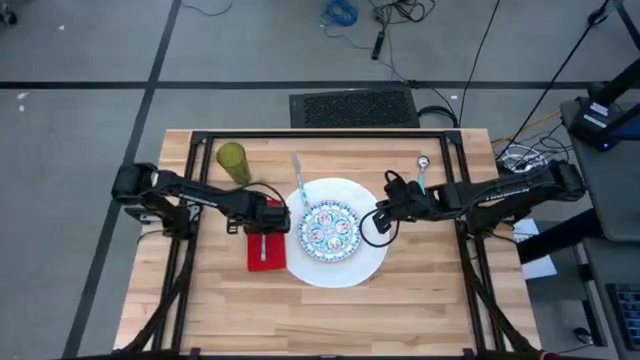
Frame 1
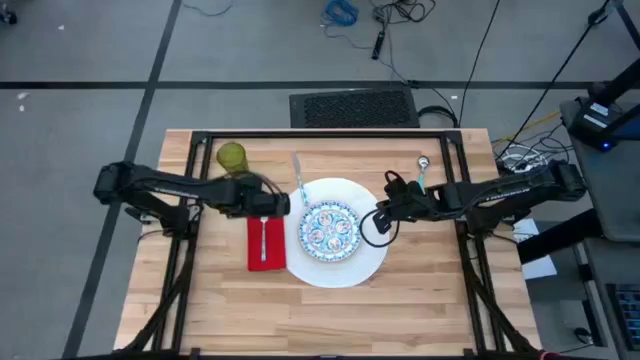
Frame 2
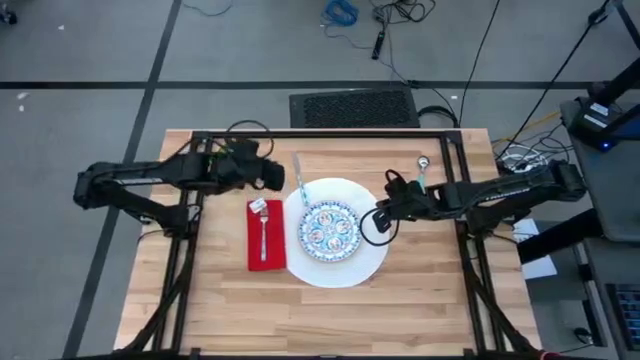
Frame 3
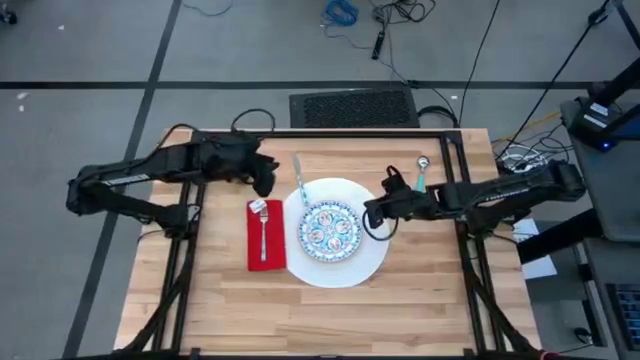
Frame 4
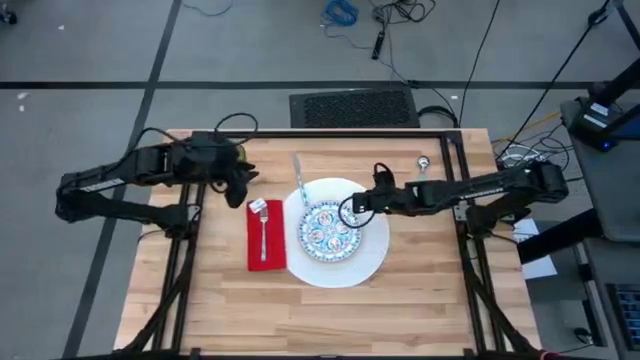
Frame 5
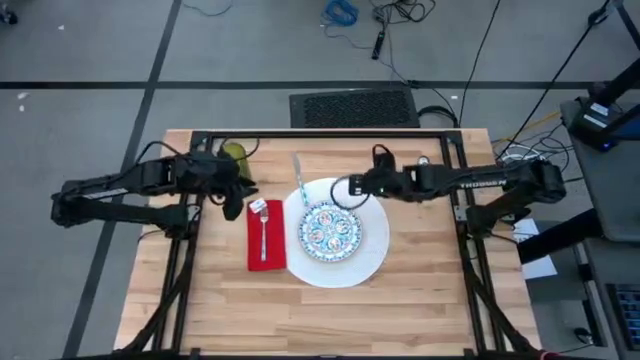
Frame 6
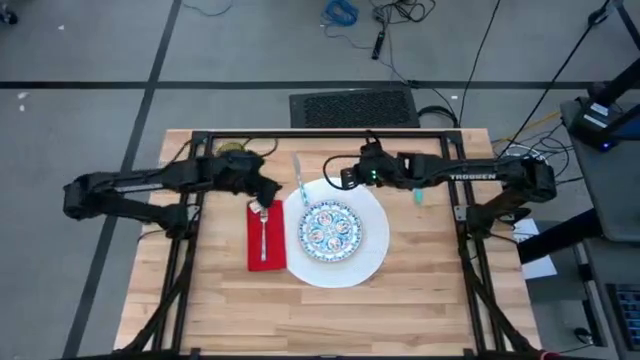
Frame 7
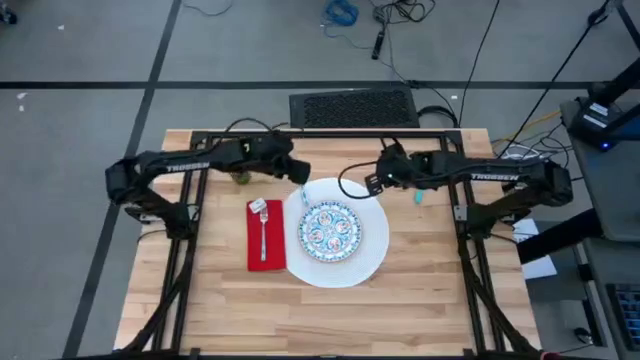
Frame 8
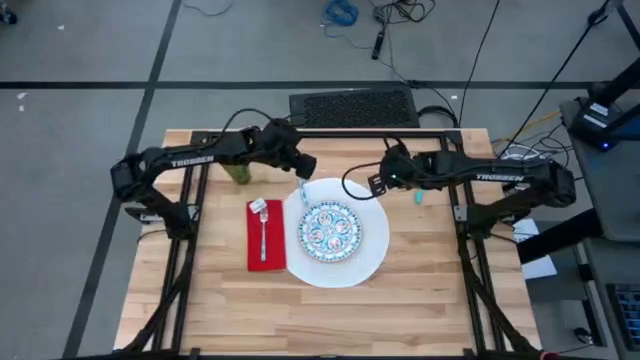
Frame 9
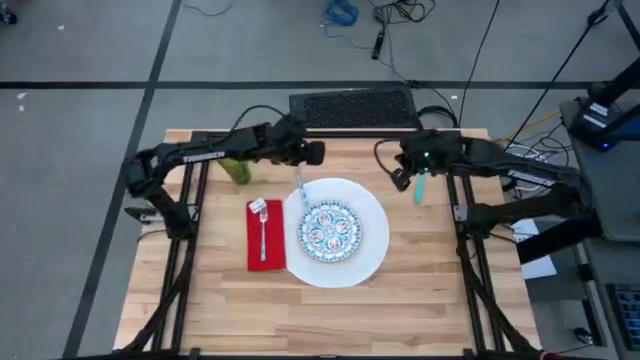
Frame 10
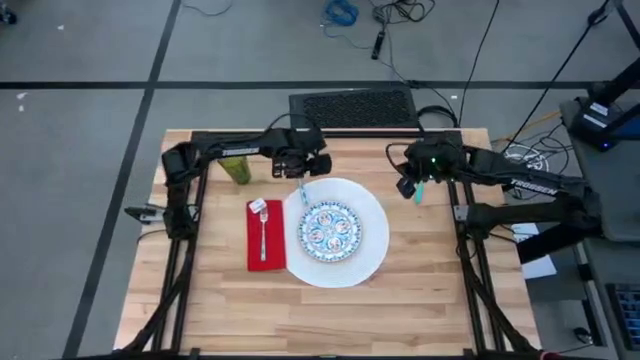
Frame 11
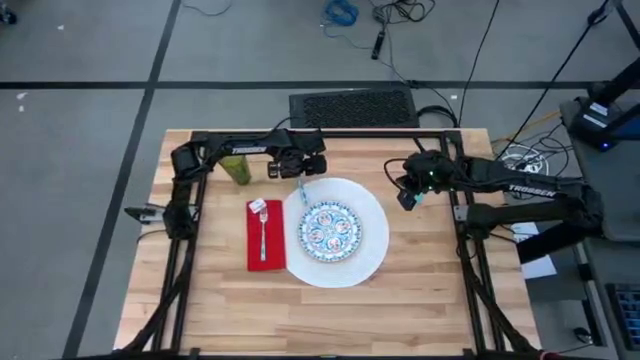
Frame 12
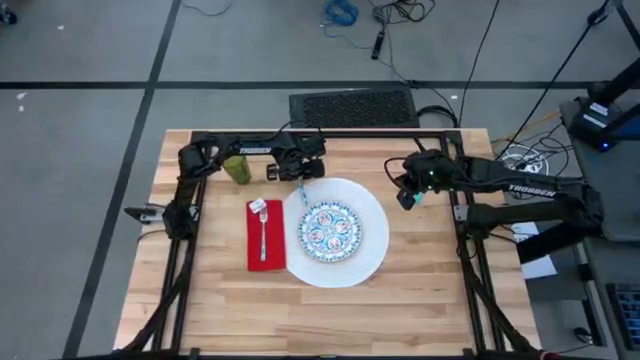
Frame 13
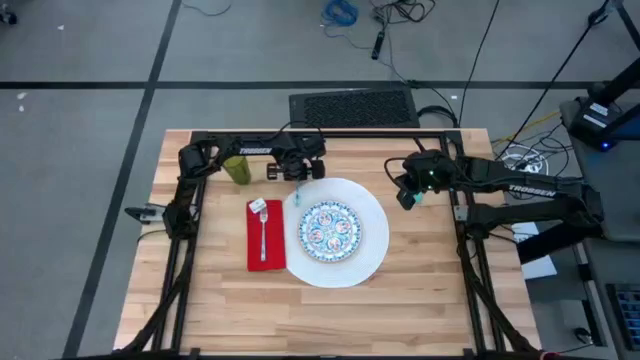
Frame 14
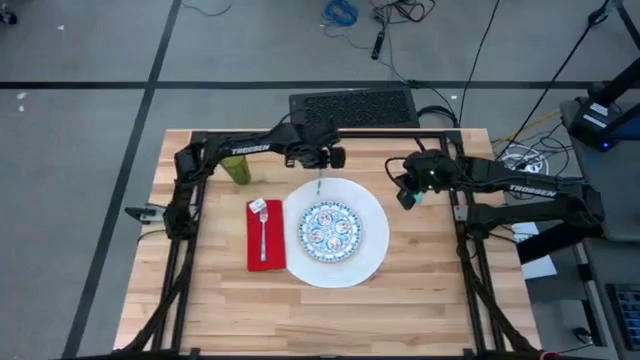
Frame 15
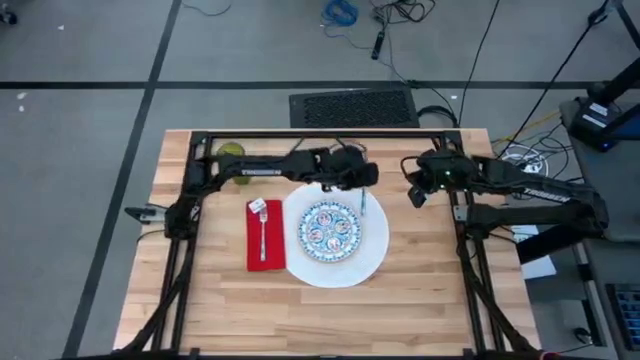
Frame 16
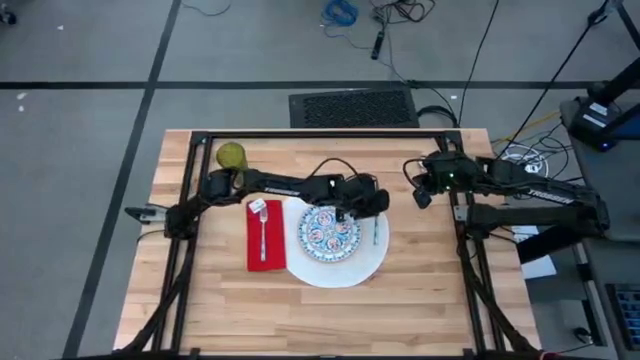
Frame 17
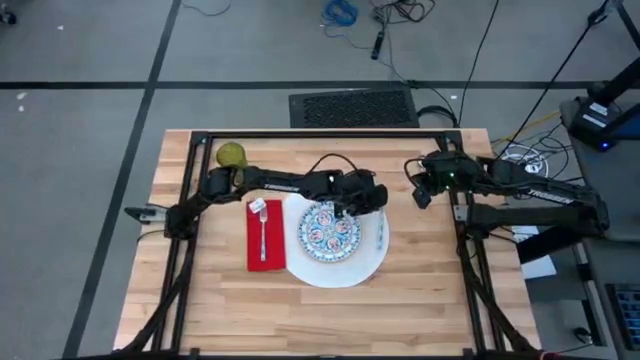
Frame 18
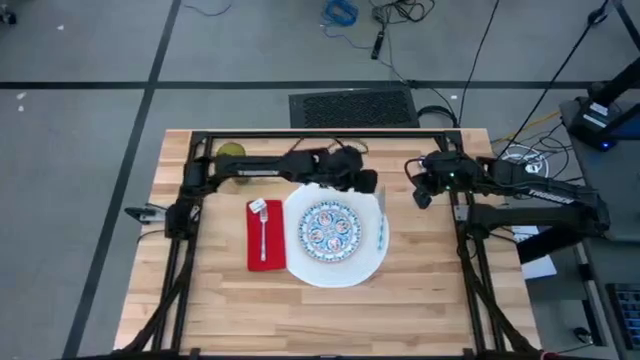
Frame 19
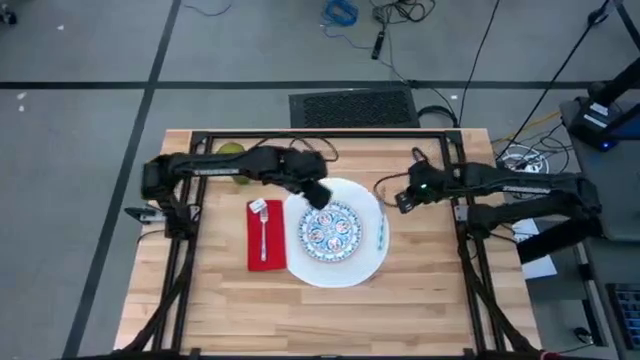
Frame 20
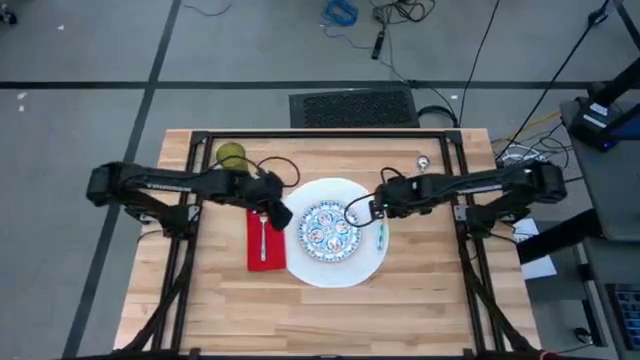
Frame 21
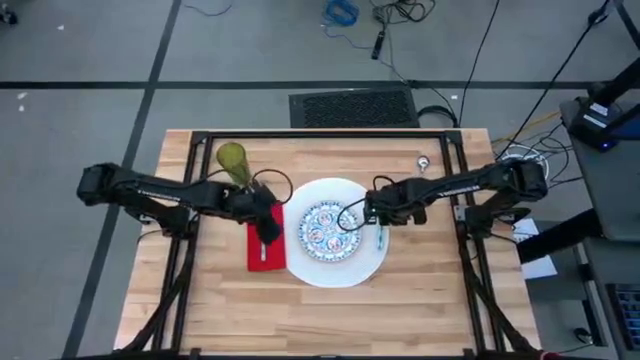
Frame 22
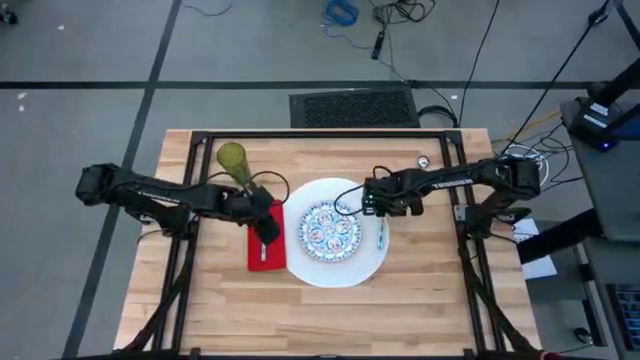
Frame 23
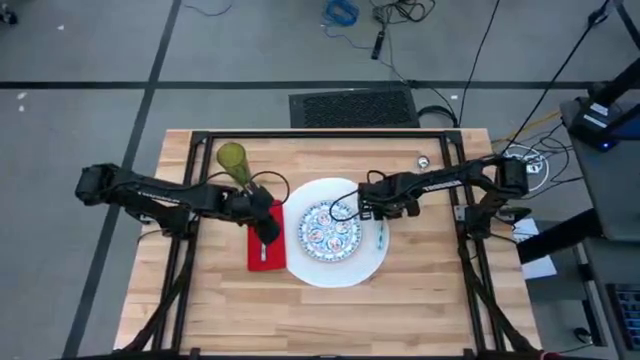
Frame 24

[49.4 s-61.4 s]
Task: Set table place
Put the white table knife to the right of the blue patterned plate on the white tablemat

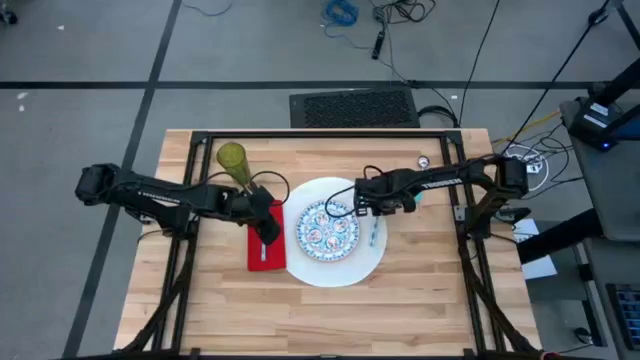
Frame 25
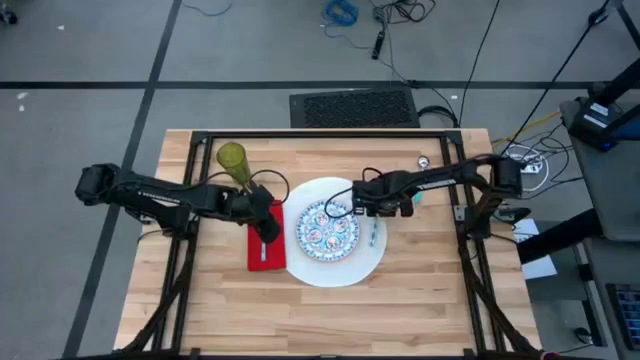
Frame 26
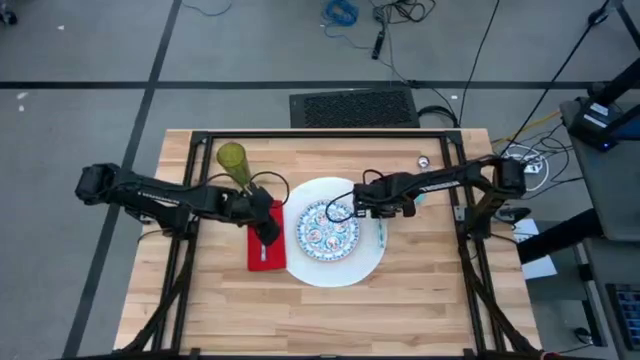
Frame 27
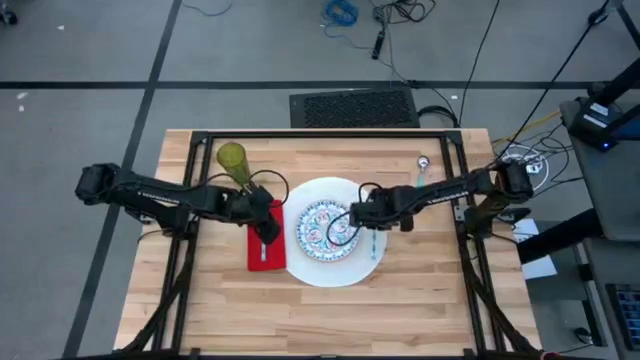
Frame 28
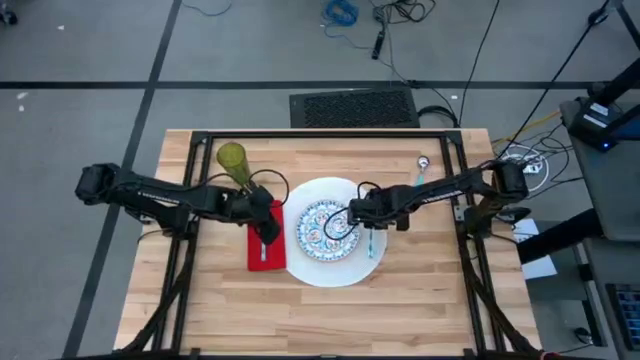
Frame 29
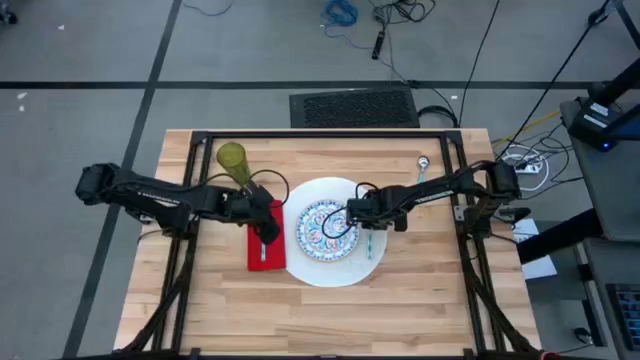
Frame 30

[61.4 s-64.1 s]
Put the white table knife to the right of the blue patterned plate on the white tablemat

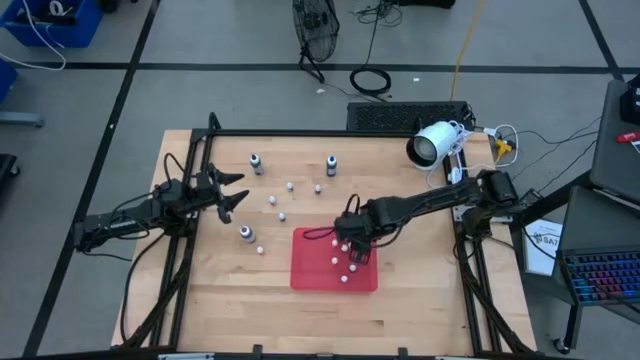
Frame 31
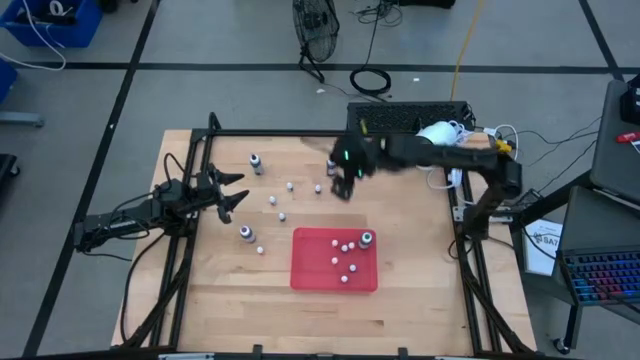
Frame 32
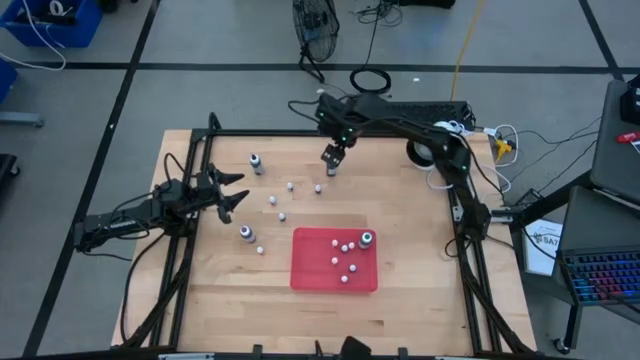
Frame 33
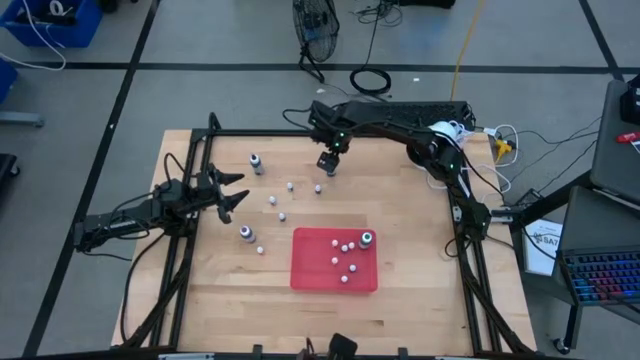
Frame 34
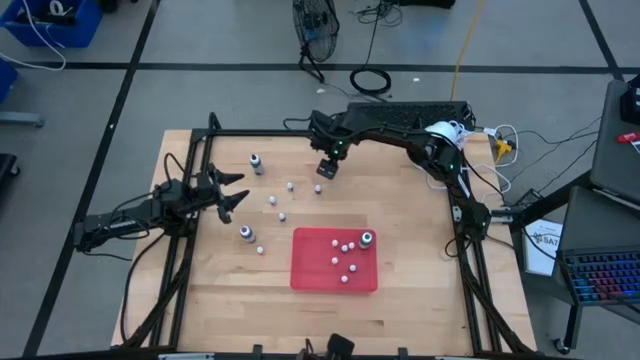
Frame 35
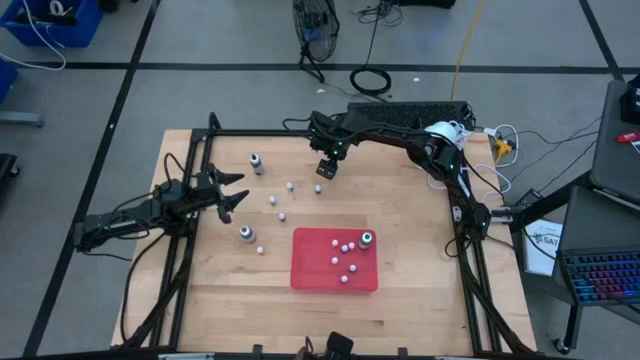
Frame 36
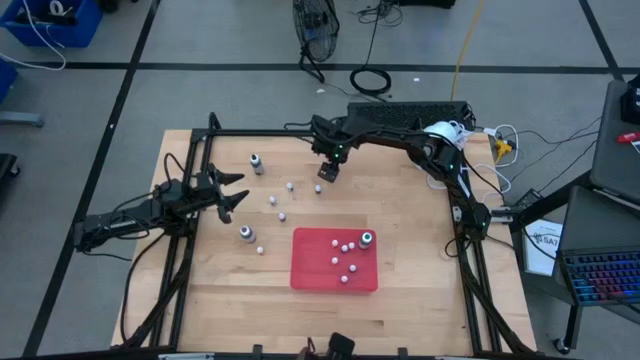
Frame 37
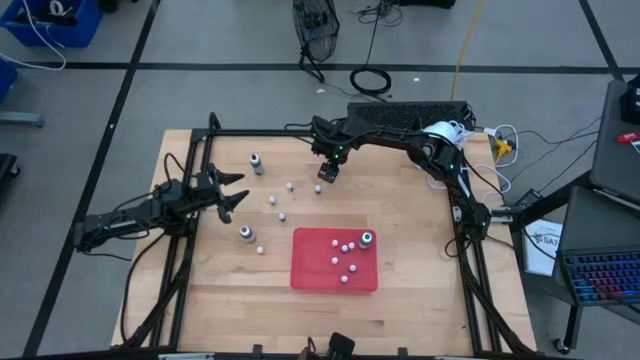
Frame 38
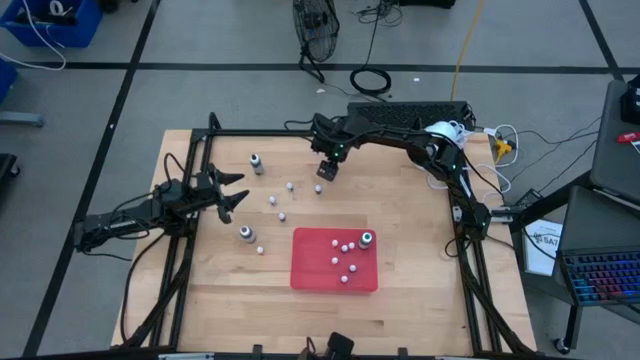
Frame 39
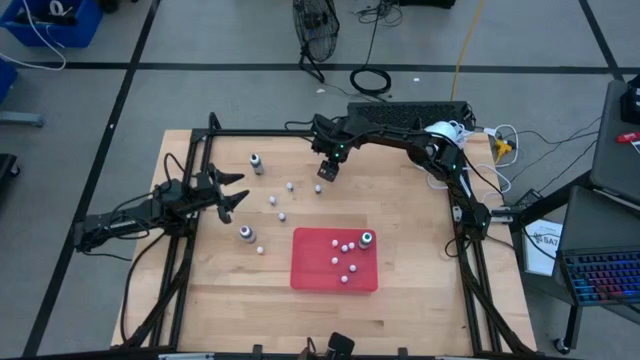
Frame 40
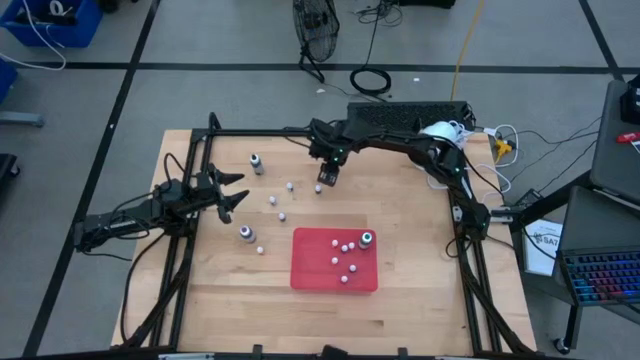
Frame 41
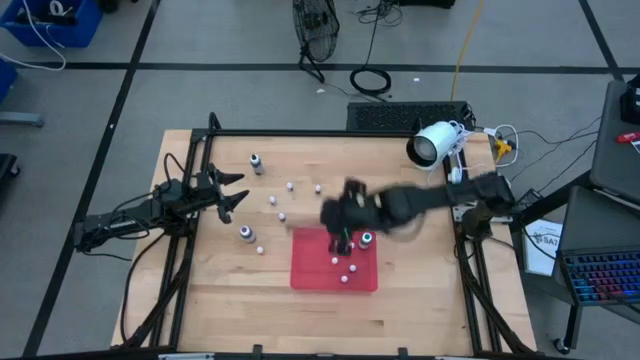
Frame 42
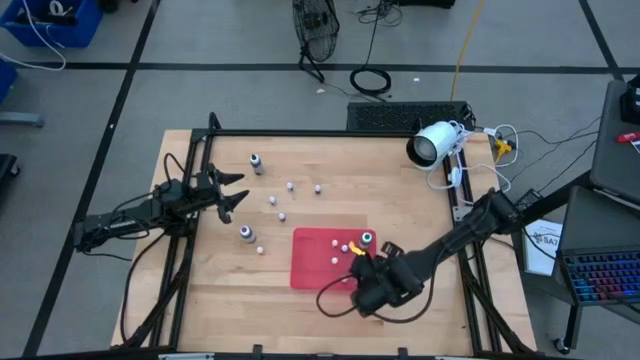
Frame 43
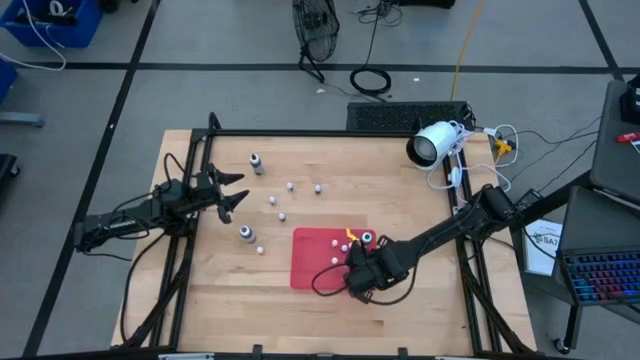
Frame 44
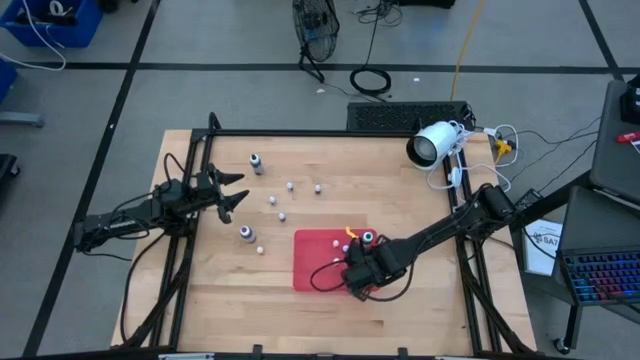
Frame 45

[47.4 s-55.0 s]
Task: Pick & Place food coloring
Put the large blue food coloring bottle into the red bin
